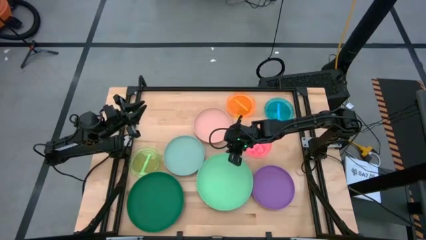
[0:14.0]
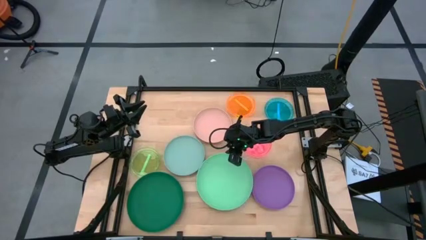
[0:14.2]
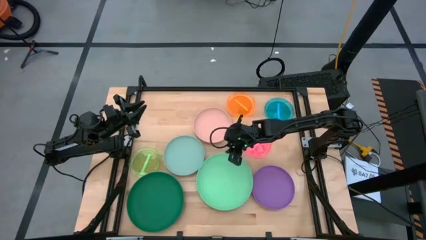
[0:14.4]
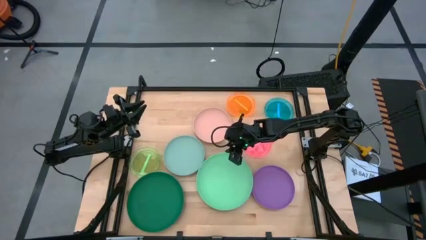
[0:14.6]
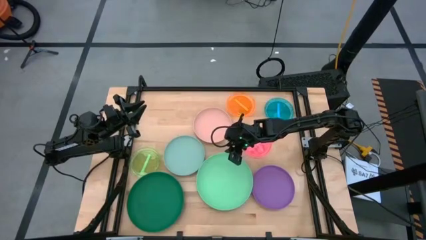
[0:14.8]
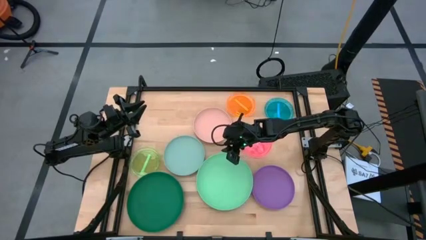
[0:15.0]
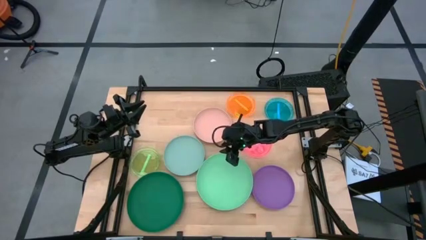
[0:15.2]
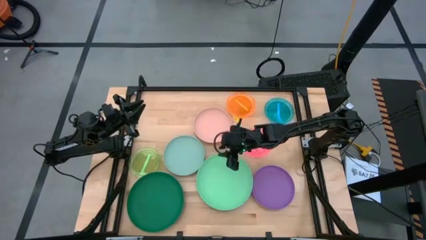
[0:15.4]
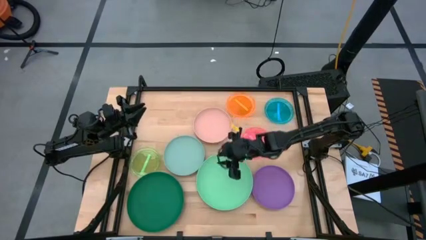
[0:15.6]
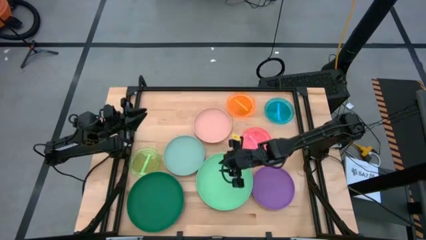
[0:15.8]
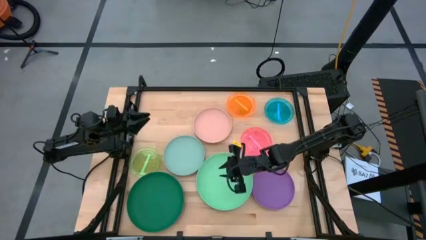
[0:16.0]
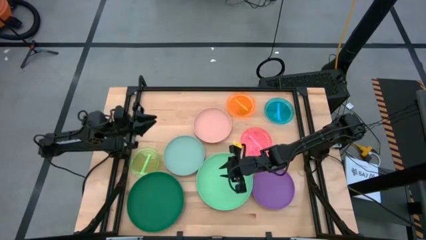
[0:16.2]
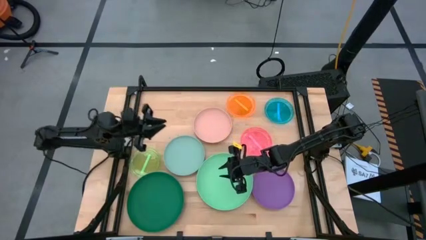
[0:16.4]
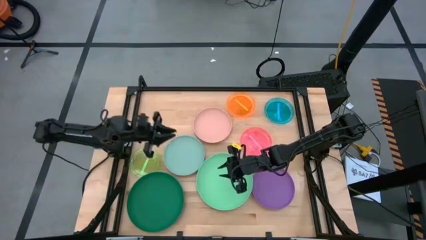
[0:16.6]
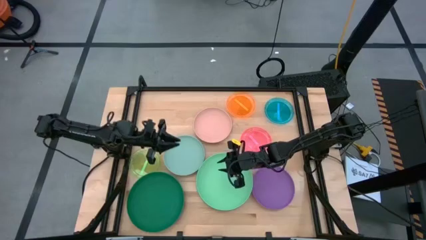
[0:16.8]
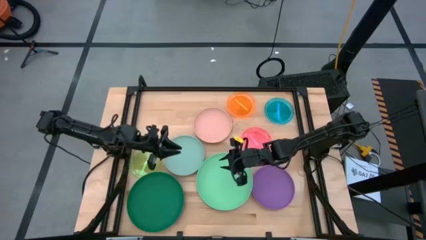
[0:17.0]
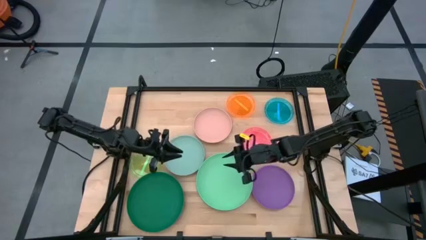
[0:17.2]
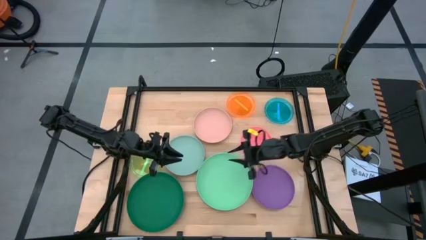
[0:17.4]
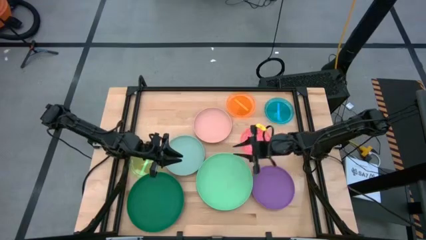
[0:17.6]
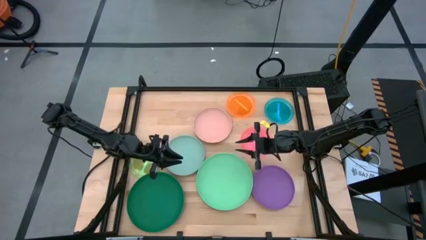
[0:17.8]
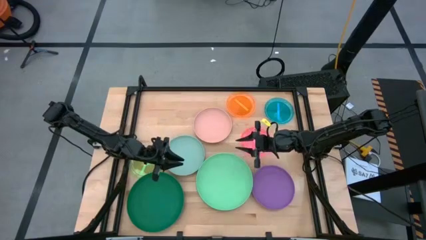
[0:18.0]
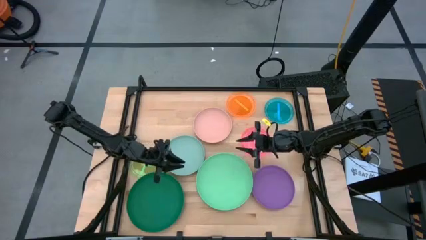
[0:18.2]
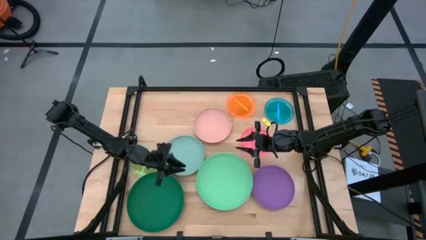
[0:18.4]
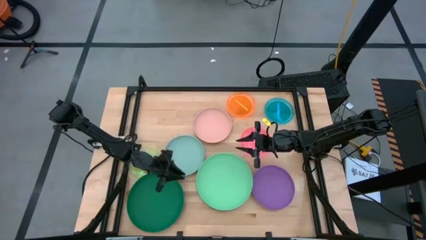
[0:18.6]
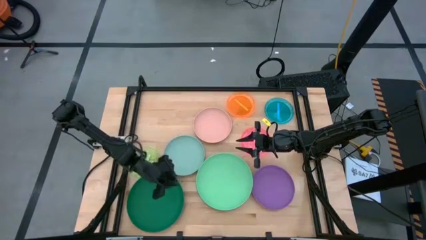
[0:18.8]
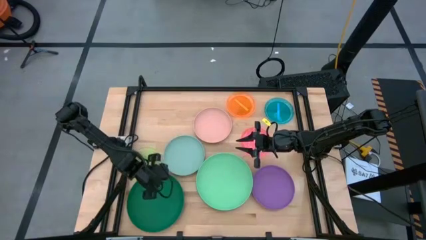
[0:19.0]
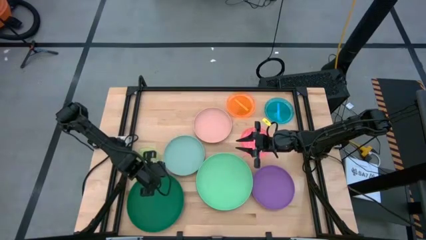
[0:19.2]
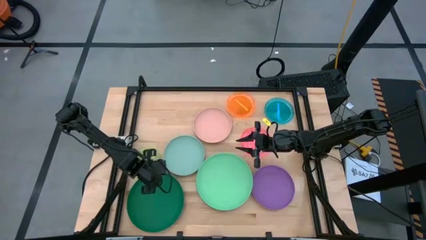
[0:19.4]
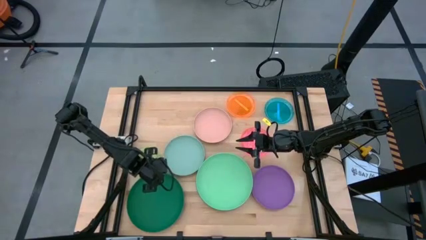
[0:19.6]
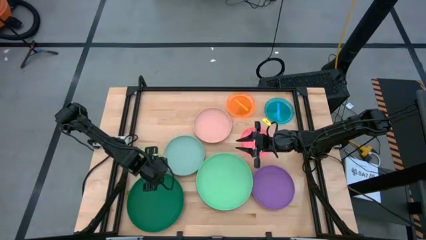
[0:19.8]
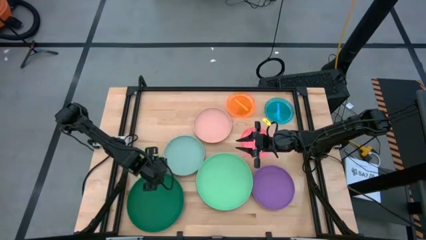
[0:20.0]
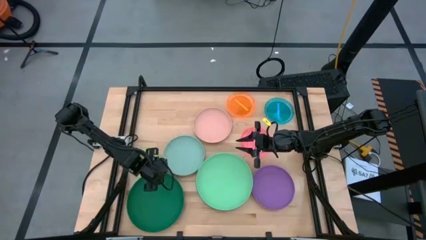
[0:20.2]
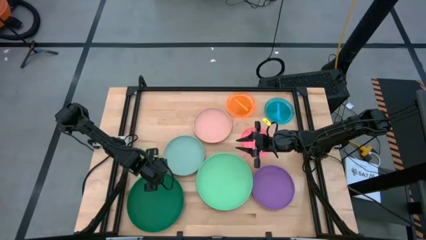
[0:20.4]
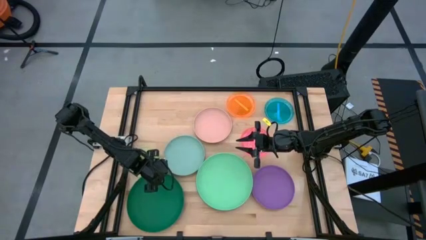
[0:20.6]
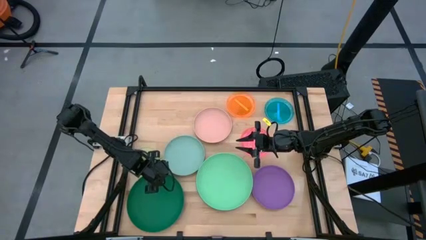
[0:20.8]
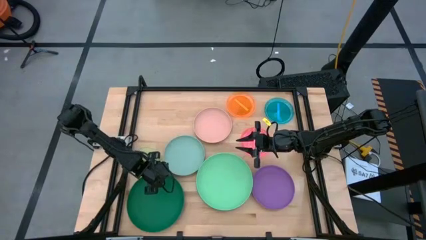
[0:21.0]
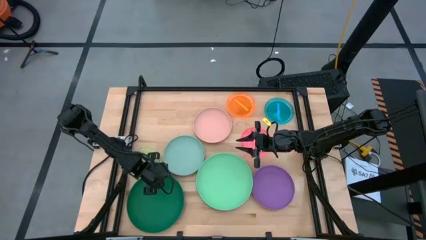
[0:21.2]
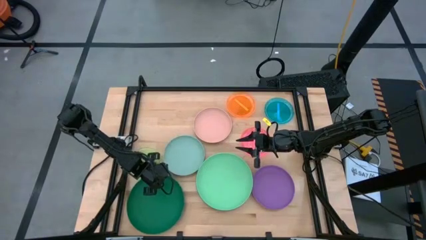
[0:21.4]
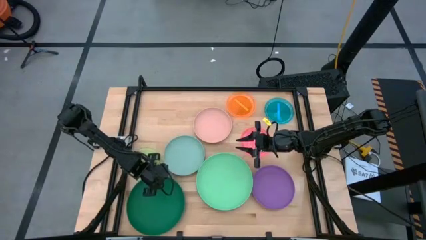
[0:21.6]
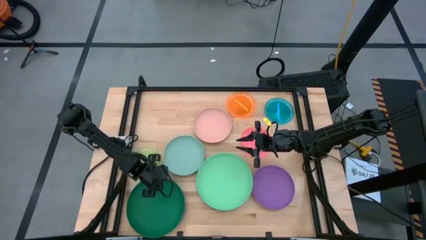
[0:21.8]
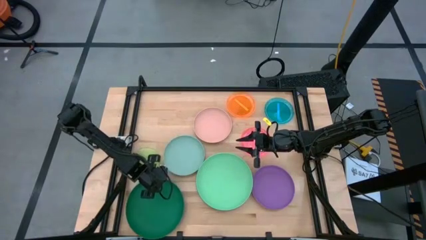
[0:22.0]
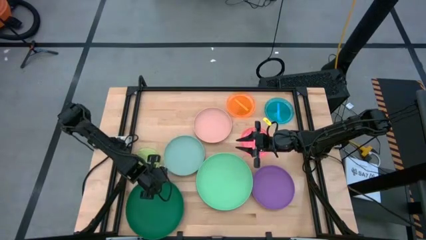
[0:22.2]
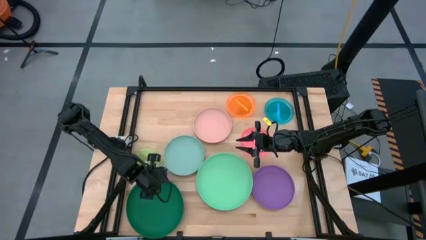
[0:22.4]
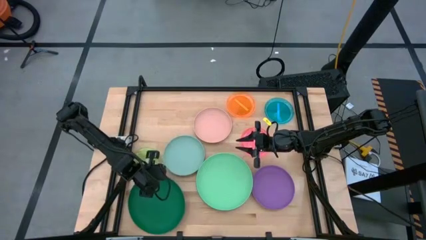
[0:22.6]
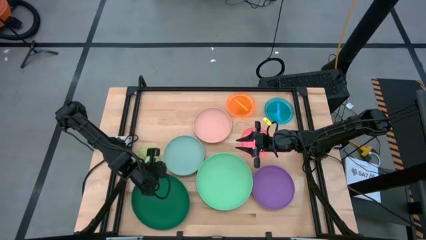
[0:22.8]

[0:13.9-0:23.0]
Task: Stack plastic plates
Stack the dark green plate on top of the light green plate

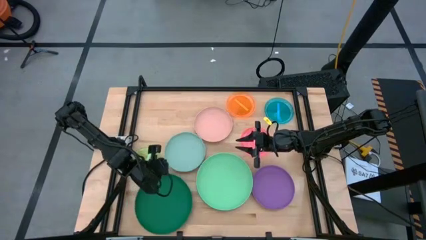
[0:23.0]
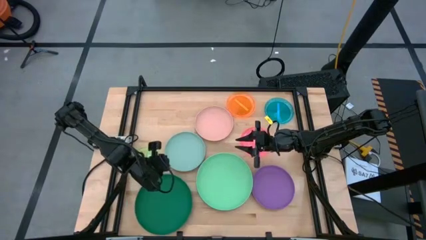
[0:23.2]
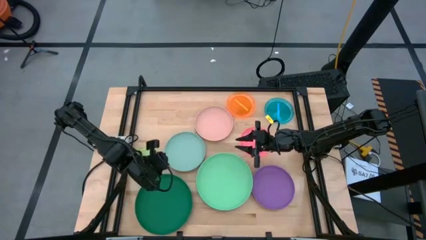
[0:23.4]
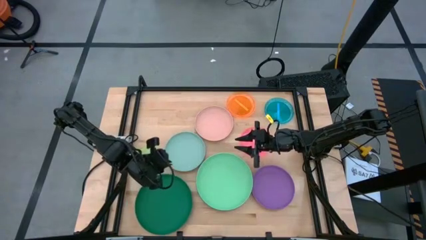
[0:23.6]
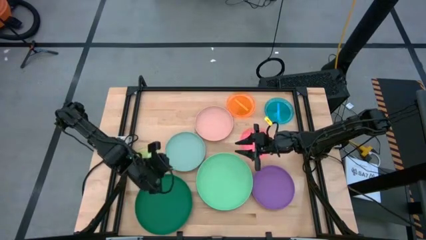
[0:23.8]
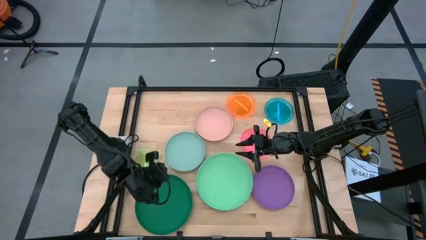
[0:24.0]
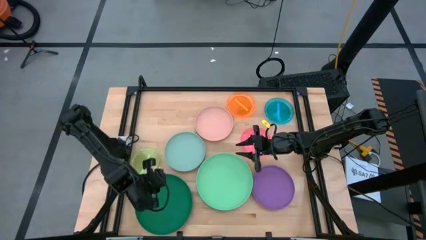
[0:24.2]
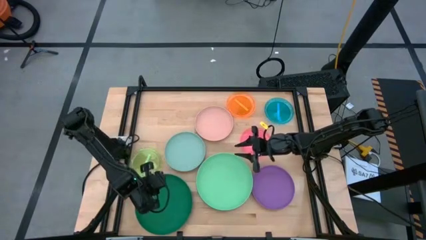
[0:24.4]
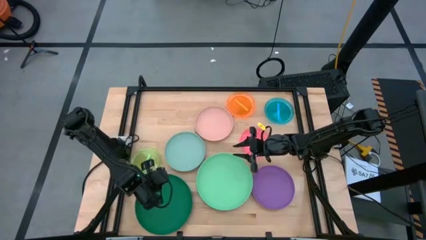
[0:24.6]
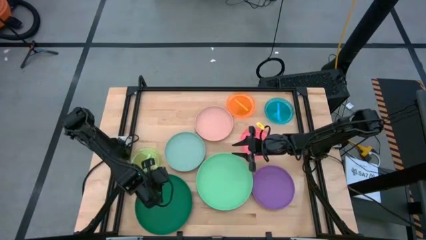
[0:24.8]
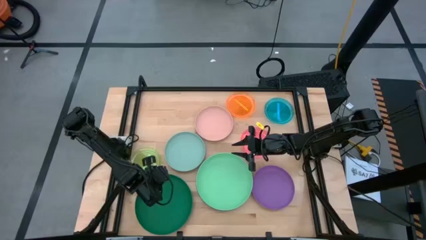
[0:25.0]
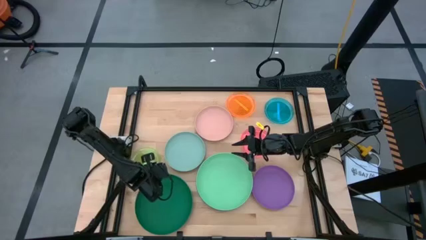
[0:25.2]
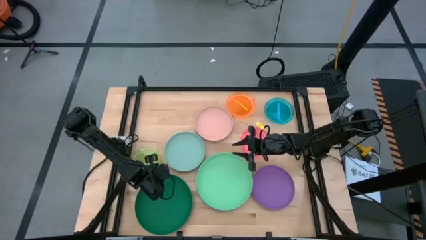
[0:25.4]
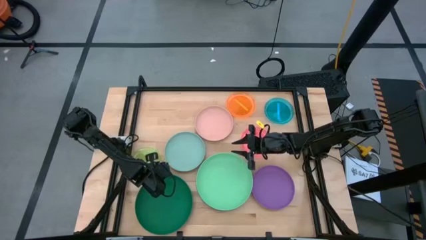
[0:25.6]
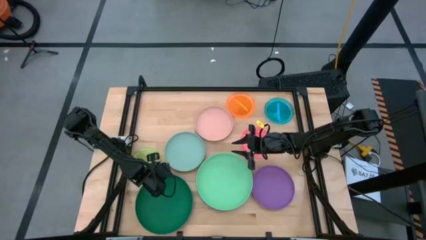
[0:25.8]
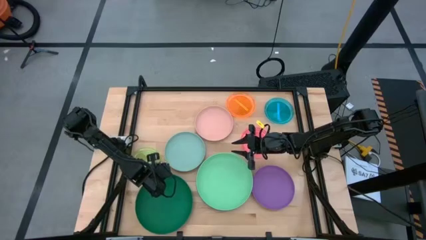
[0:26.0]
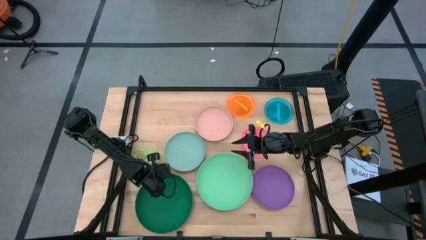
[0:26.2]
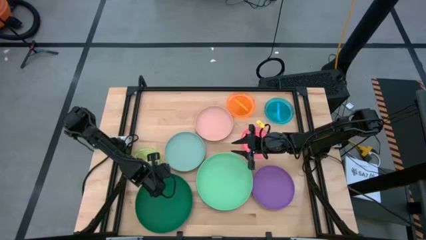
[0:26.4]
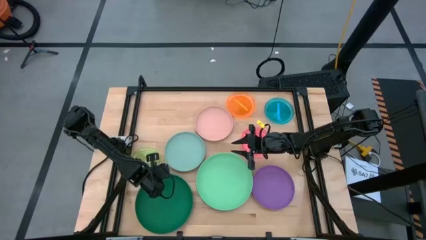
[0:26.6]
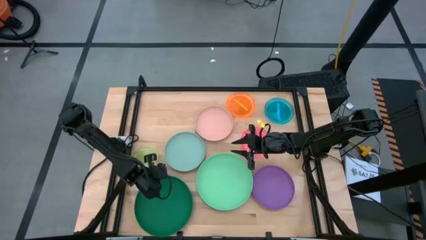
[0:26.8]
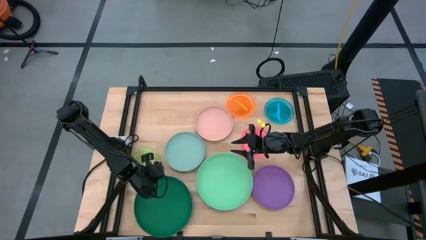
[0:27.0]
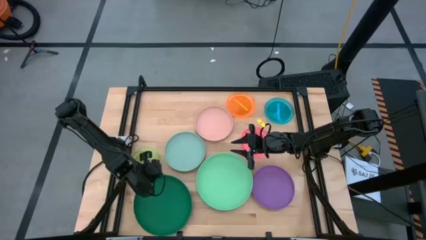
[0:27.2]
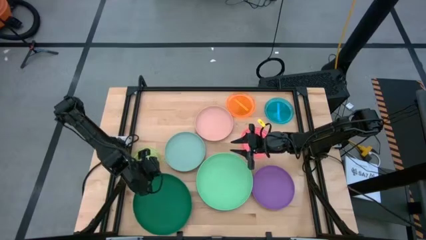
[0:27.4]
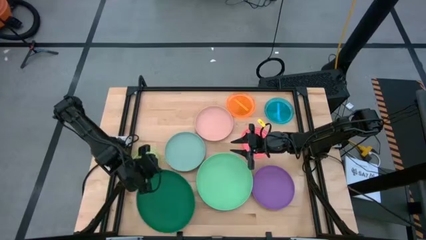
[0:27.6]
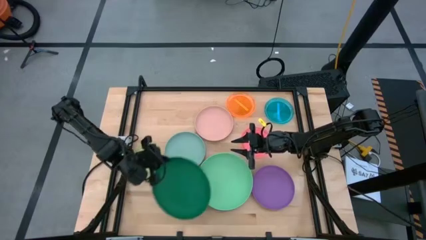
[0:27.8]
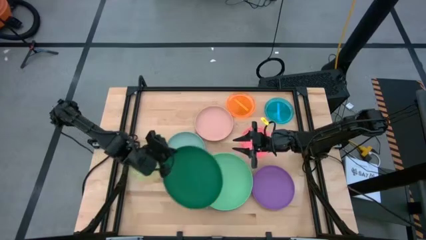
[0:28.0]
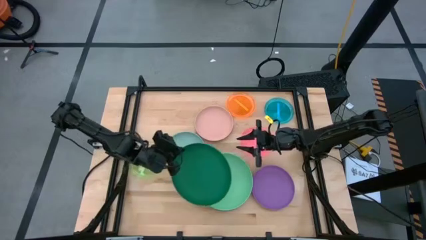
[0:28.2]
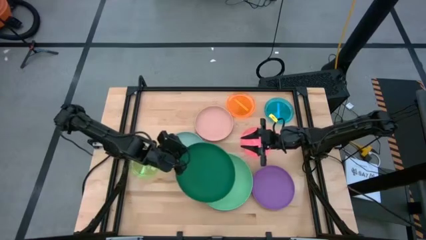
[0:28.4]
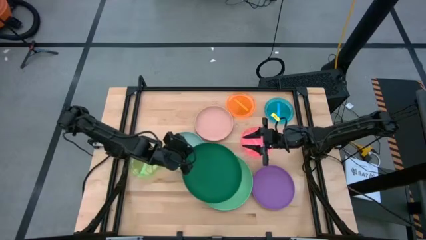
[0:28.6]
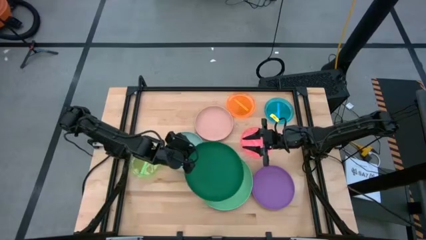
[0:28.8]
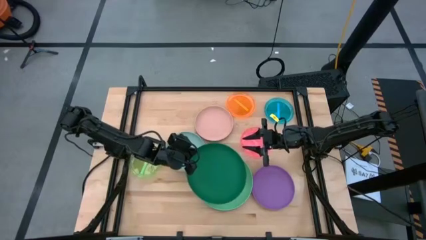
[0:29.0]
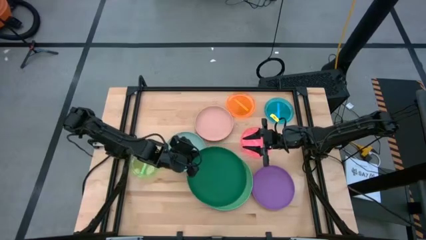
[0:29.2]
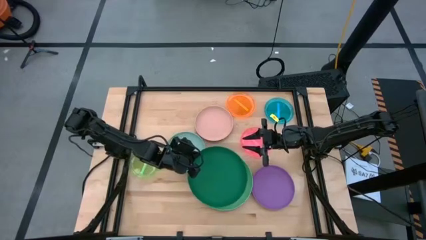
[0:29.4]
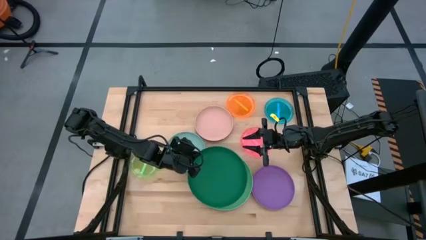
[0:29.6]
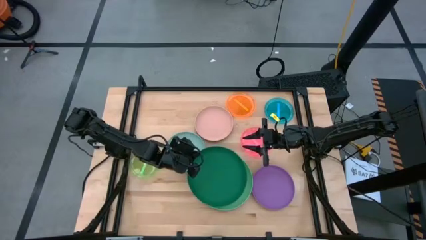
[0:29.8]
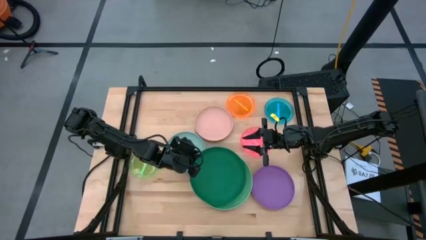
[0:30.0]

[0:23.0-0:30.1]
Stack the dark green plate on top of light green plate

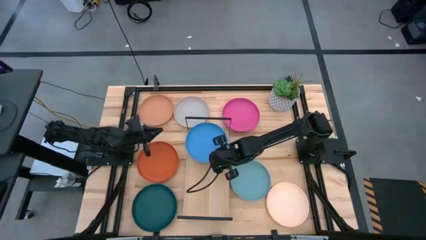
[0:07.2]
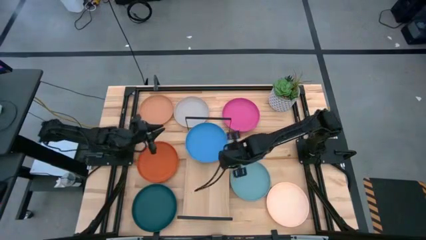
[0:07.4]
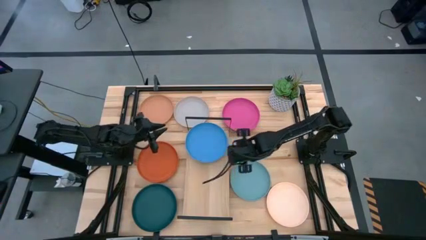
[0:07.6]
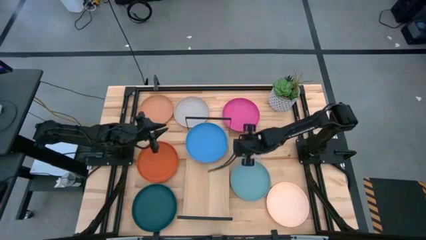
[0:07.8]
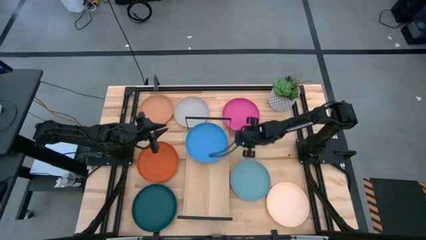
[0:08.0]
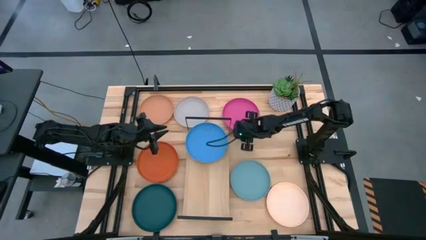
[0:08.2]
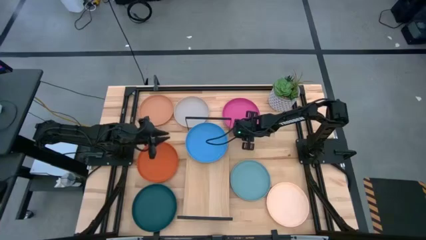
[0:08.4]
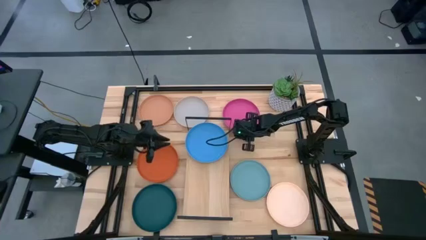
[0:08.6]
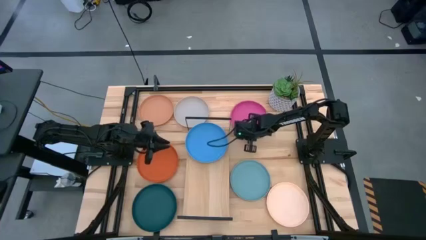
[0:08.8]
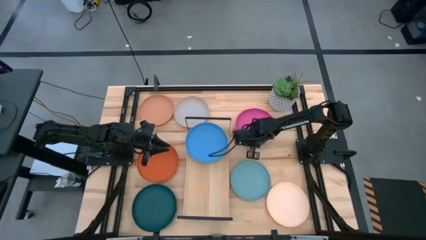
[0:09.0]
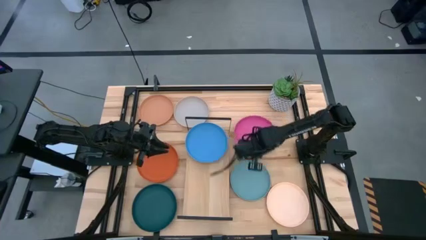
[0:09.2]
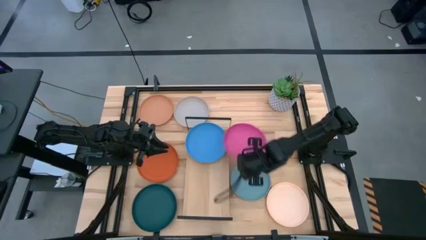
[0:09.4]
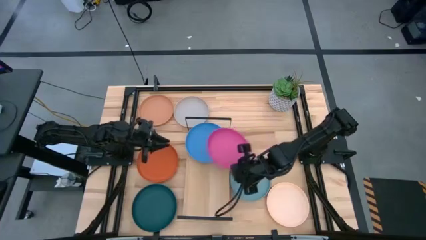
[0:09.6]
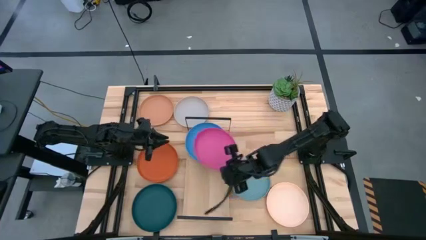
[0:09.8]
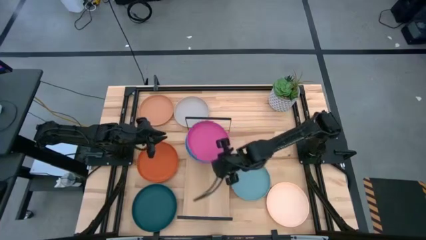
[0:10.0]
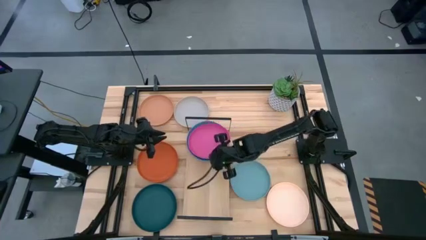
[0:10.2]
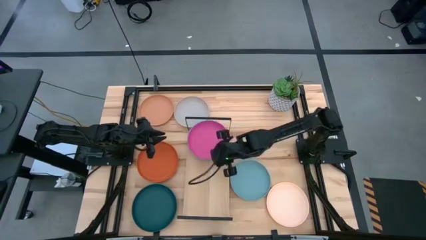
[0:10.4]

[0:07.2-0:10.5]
Task: Place and stack plates onto a shelf
Stack the pink plate on top of the blue plate on the shelf
